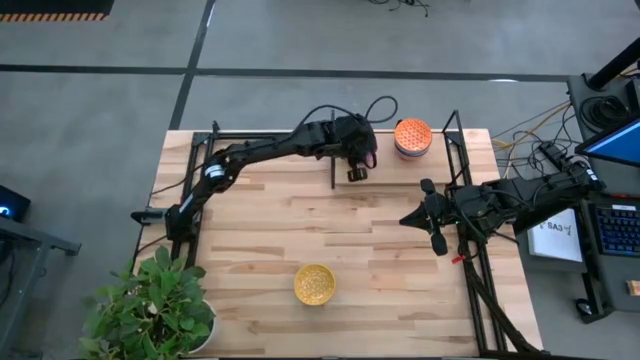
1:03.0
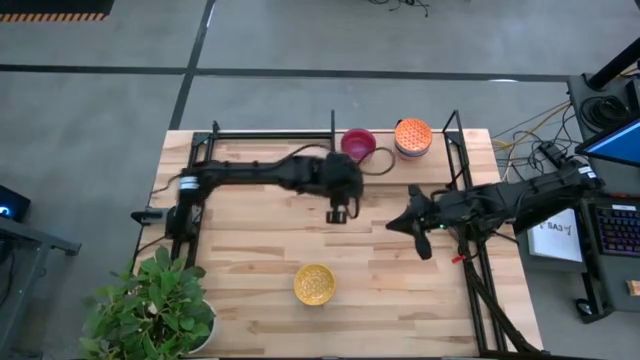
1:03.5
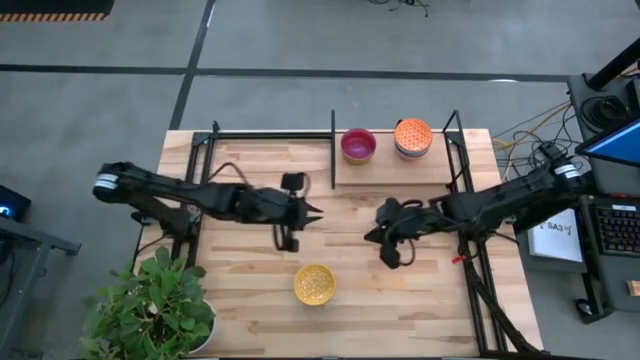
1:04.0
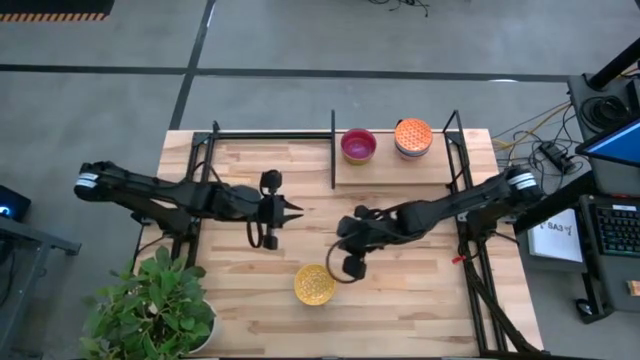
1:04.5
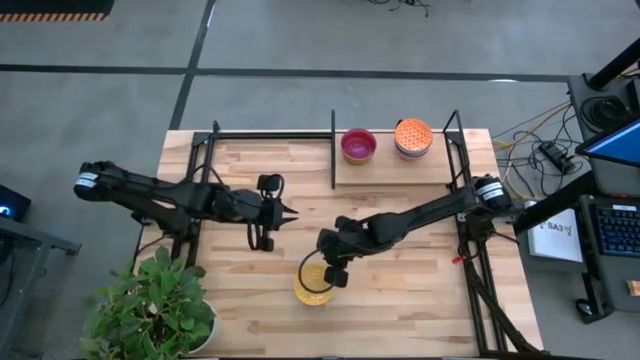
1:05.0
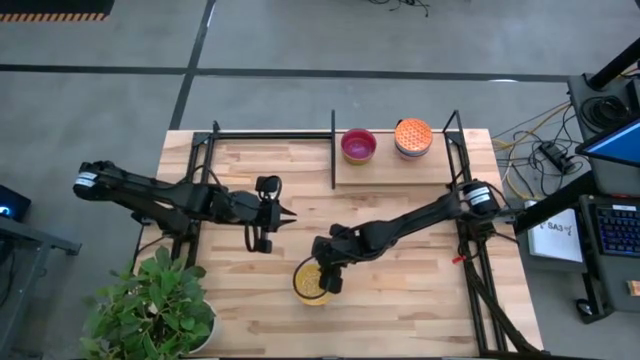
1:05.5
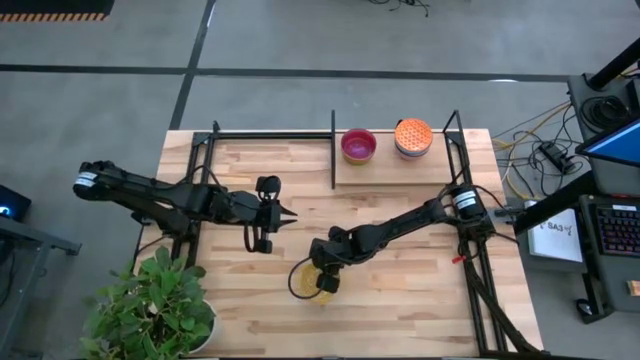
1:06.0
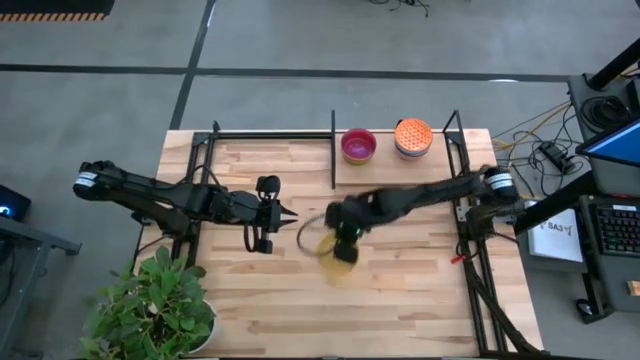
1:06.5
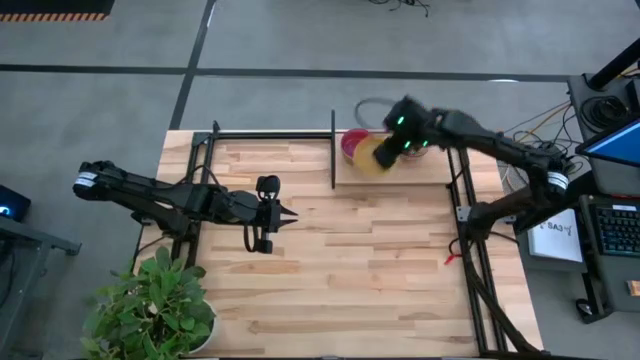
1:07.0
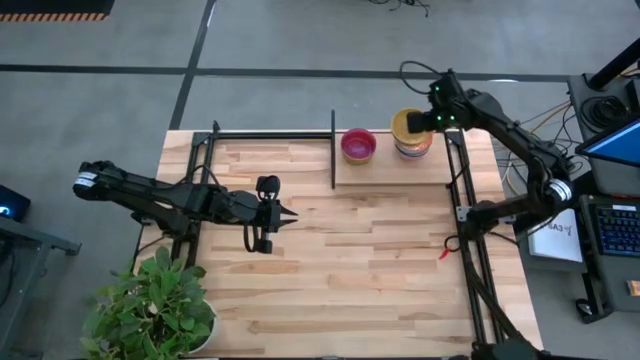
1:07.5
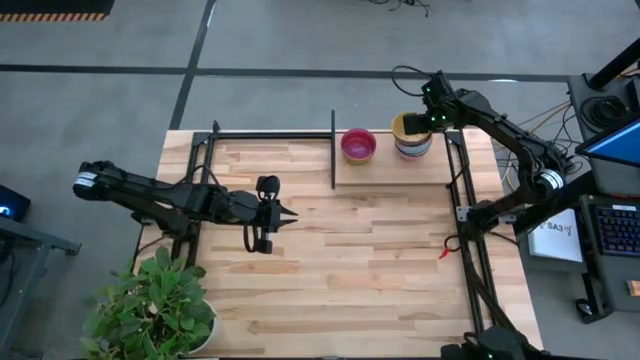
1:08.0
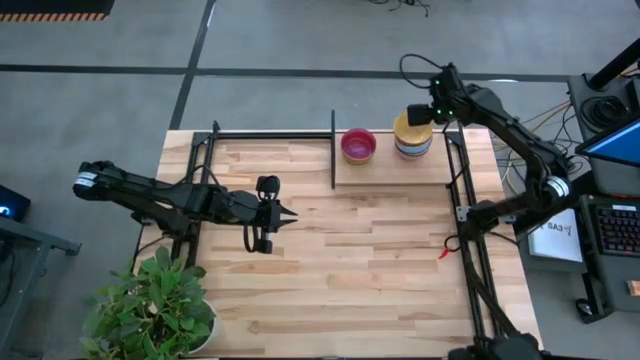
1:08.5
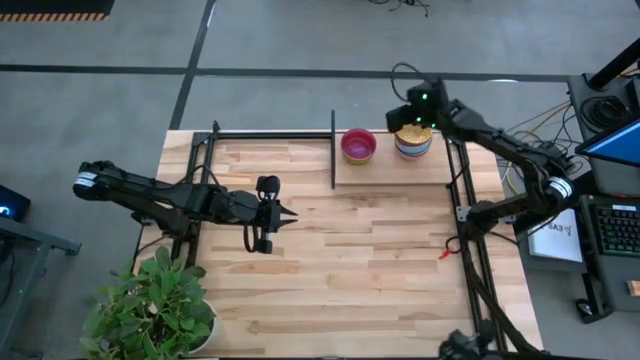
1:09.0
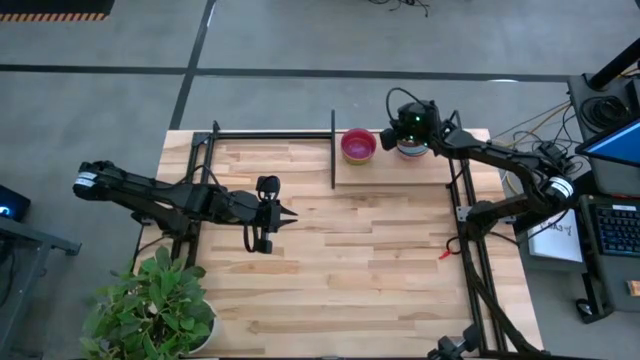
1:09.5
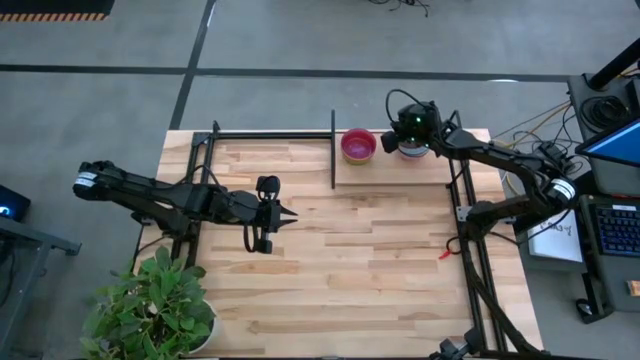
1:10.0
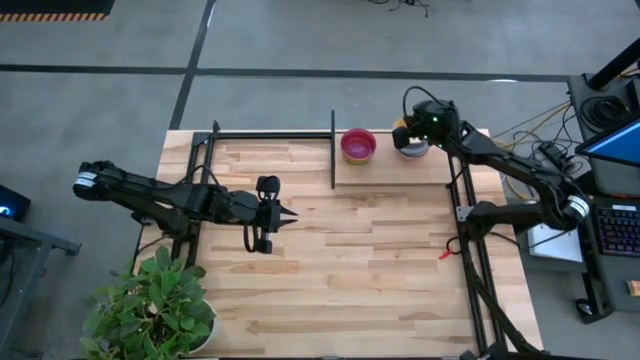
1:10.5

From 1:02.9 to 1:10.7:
Task: Place and stack bowls onto a shelf
Stack the yellow patterned bowl on top of the orange patterned bowl on the shelf

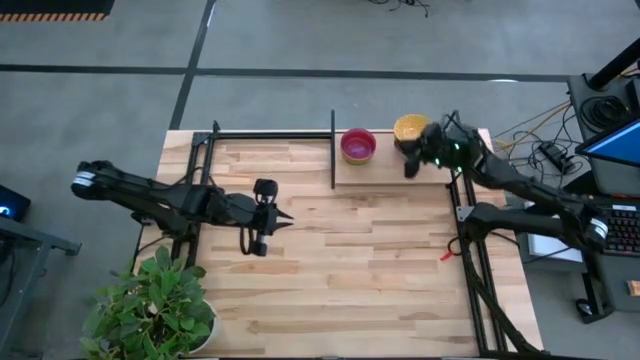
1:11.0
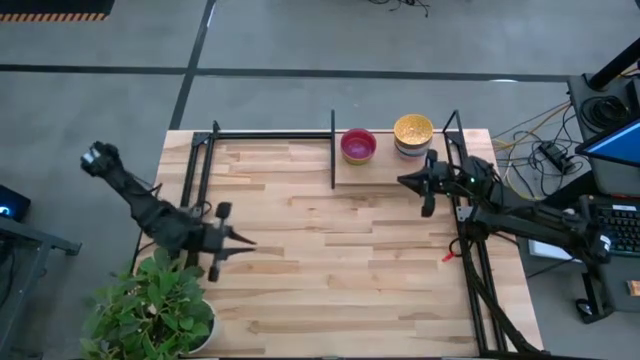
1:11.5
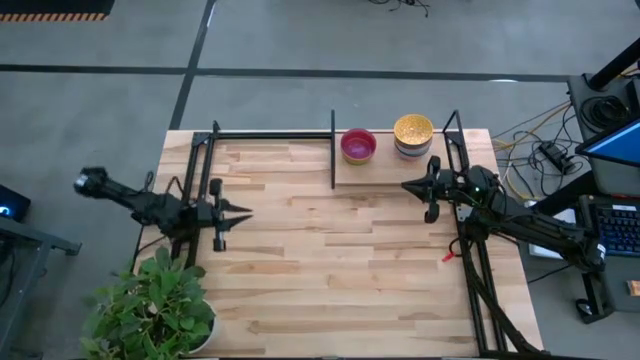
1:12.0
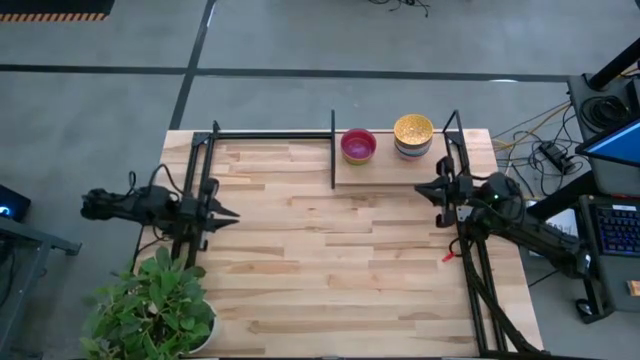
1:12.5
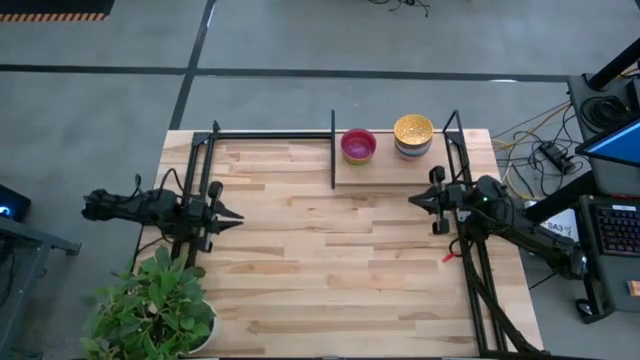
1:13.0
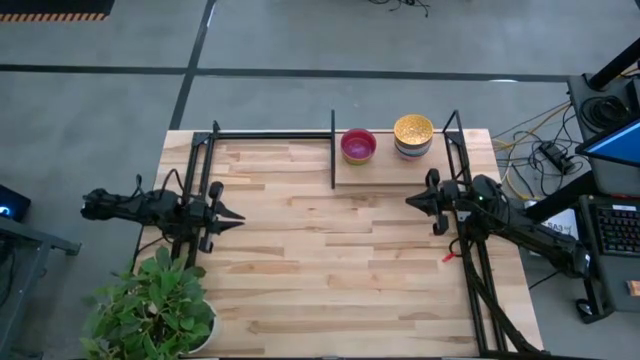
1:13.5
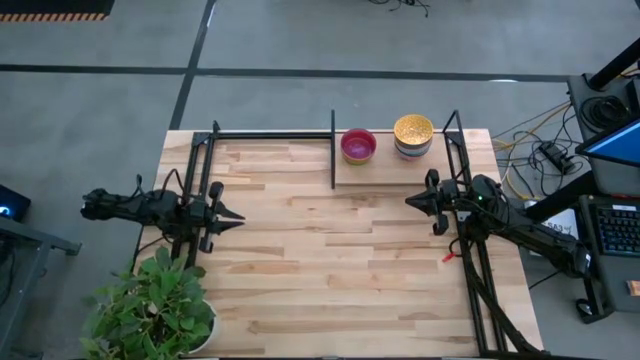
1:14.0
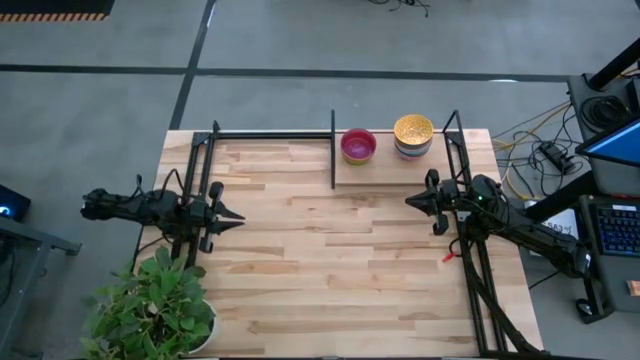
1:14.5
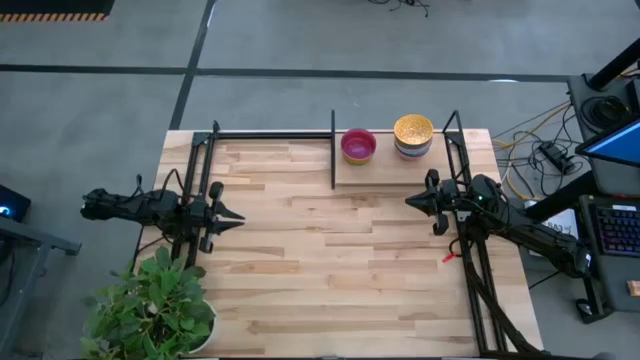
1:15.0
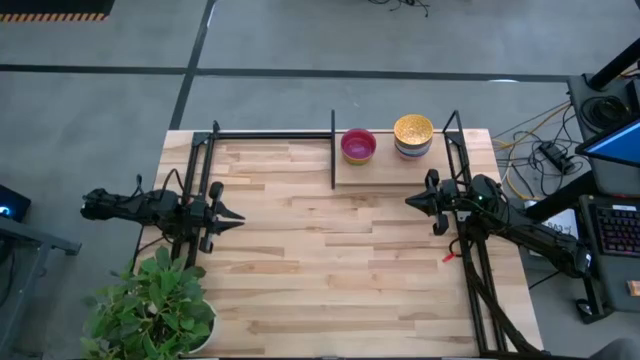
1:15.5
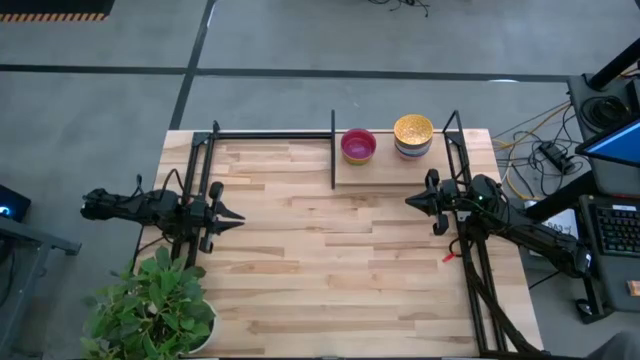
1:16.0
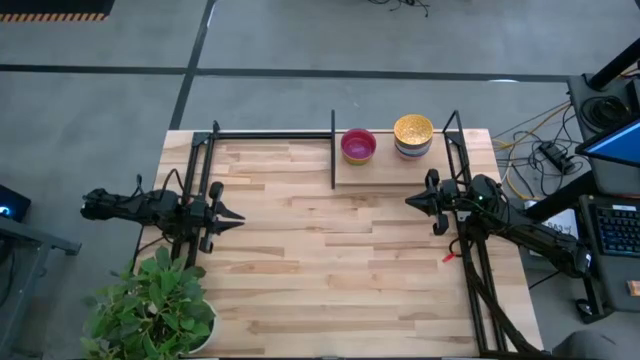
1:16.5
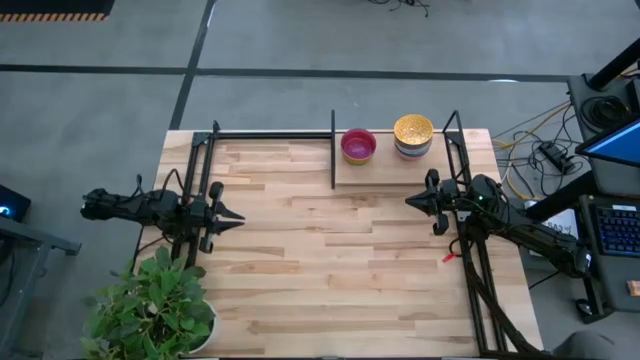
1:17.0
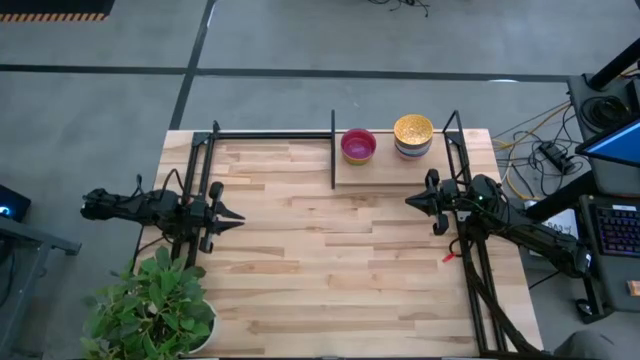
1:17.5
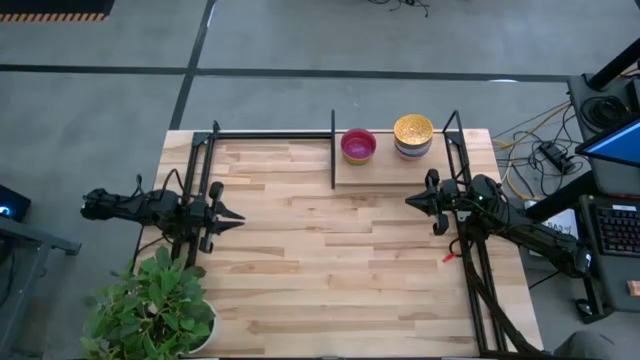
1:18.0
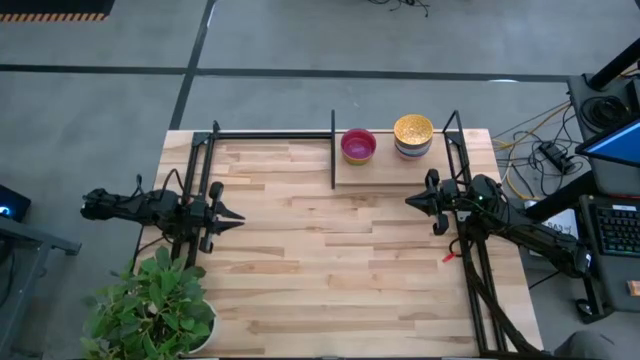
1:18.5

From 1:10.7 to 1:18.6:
Return to Home Position

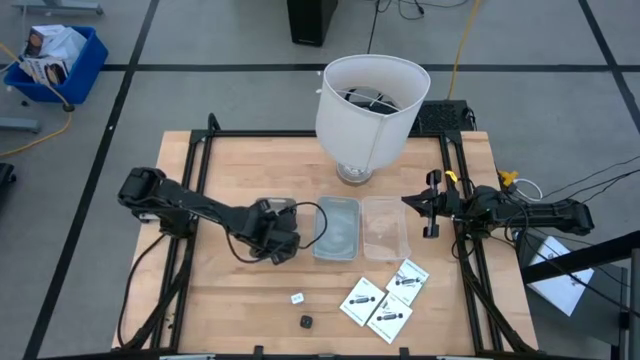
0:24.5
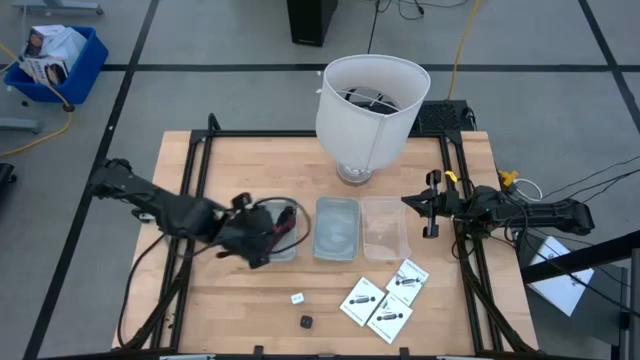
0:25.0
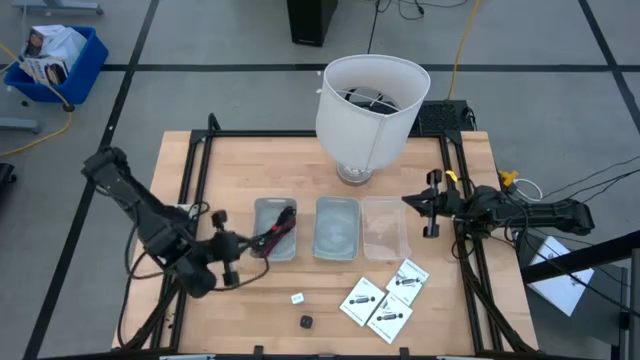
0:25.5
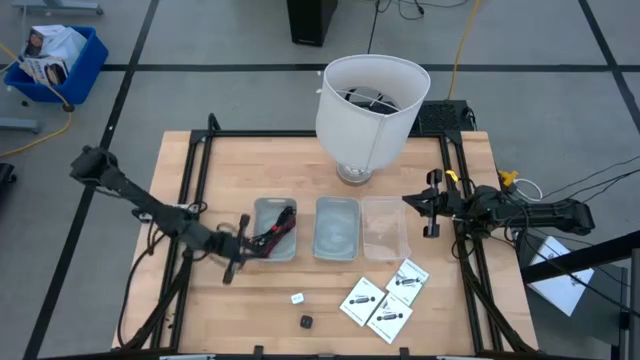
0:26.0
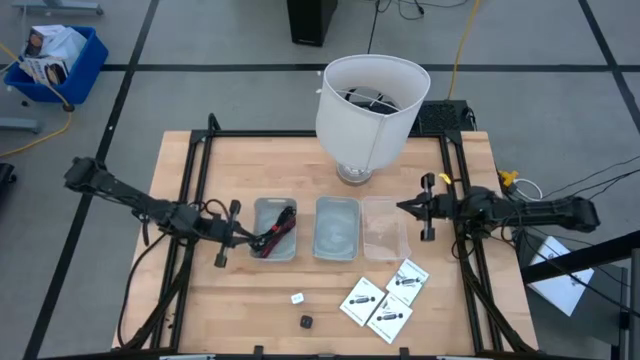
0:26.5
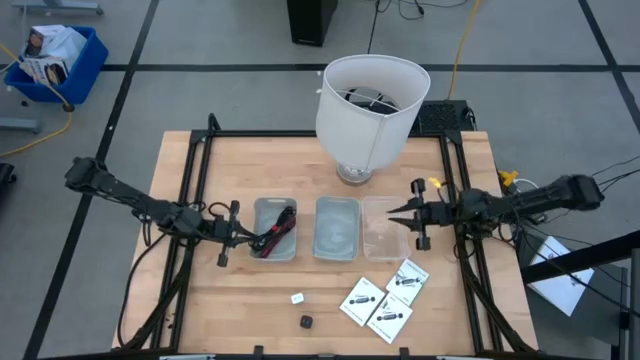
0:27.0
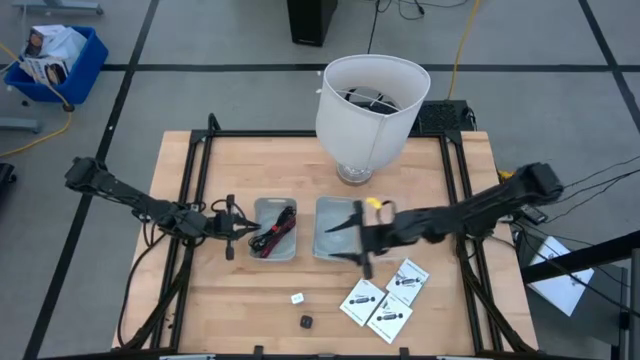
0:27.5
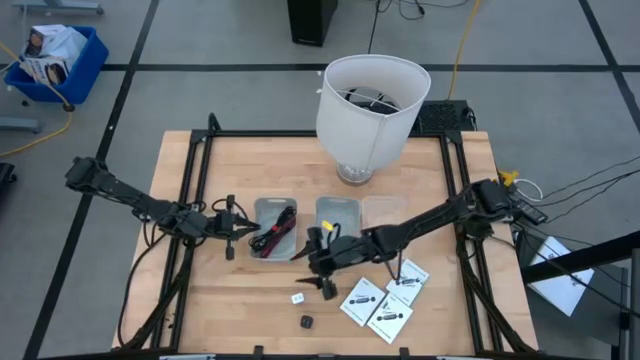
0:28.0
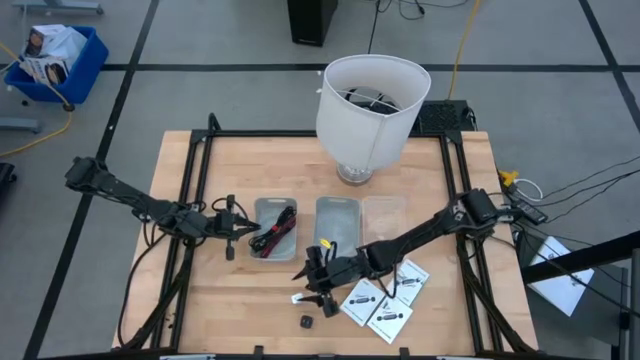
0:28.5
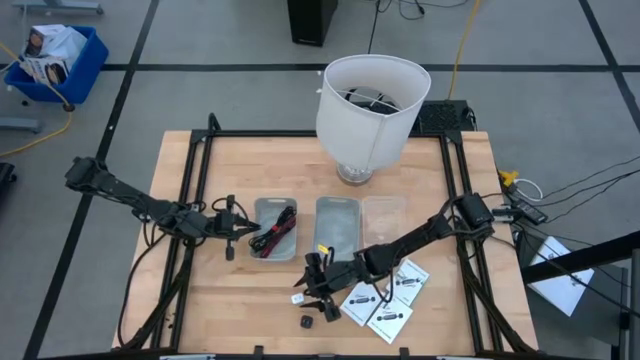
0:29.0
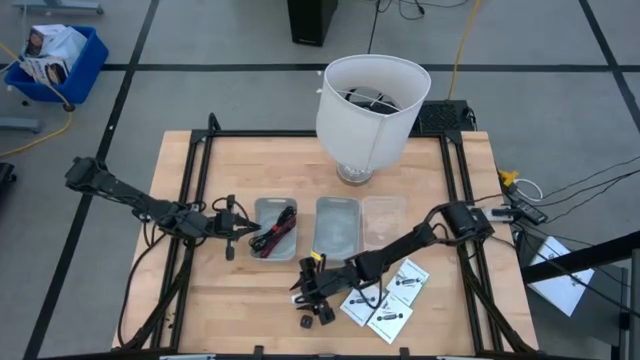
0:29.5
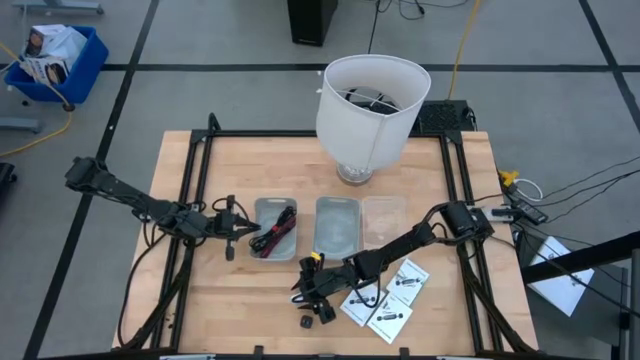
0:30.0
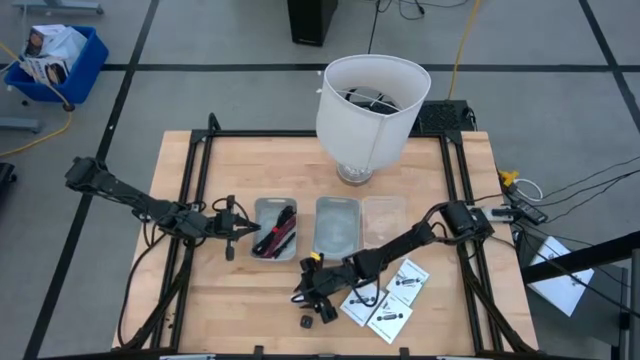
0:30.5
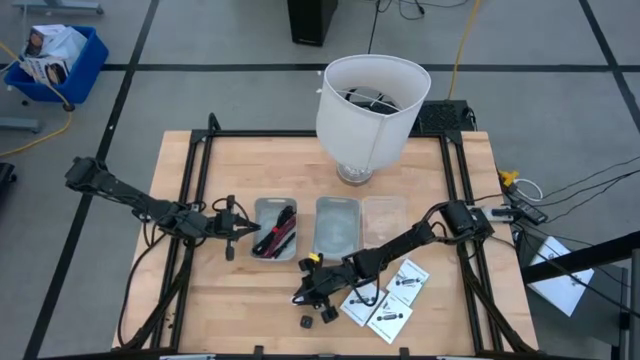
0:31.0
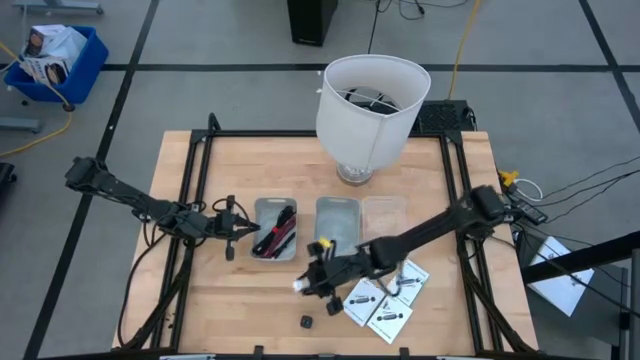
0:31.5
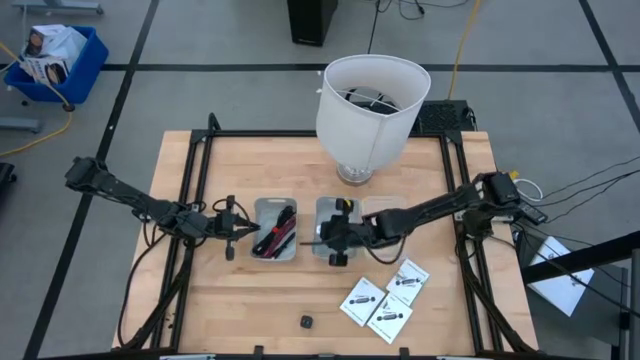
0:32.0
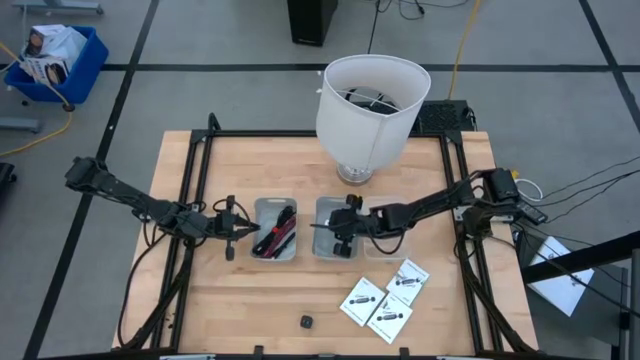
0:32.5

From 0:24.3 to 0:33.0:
Task: Pick and place items into bin
Put the white charger adapter into the right gray bin
